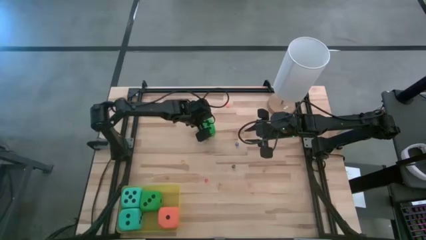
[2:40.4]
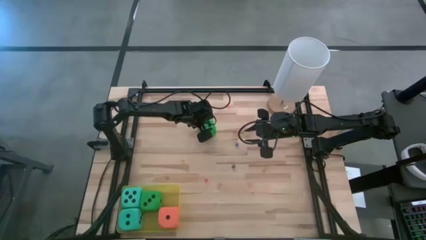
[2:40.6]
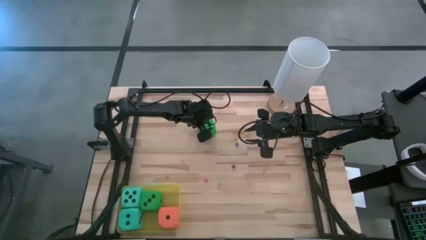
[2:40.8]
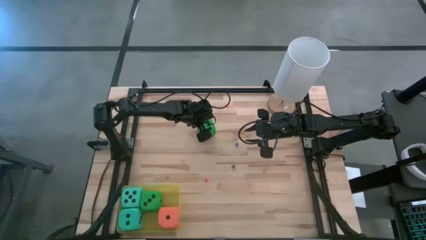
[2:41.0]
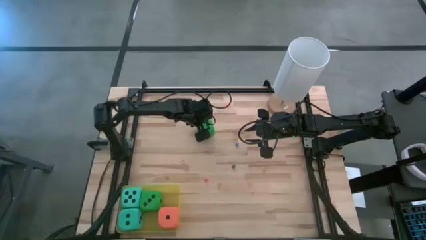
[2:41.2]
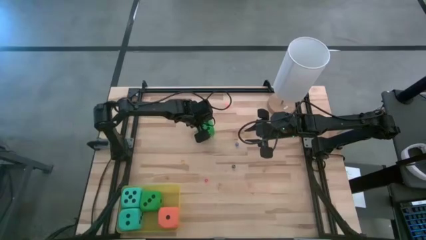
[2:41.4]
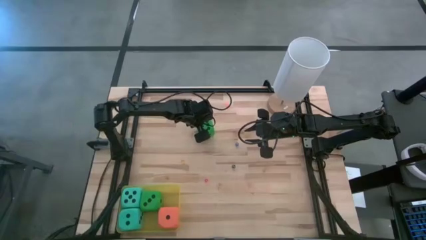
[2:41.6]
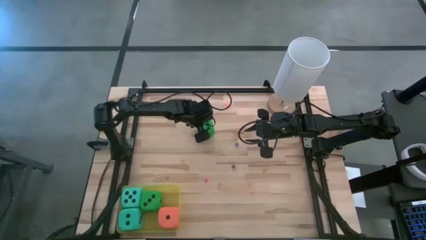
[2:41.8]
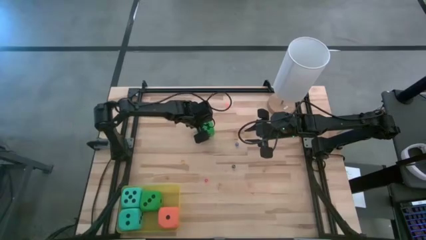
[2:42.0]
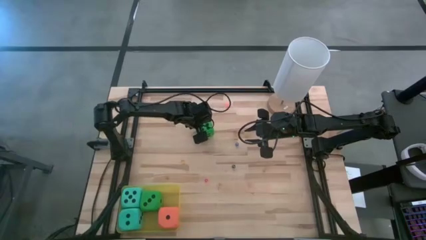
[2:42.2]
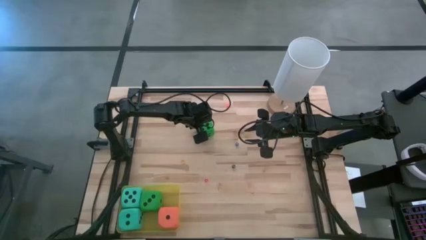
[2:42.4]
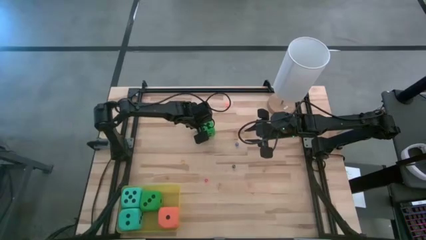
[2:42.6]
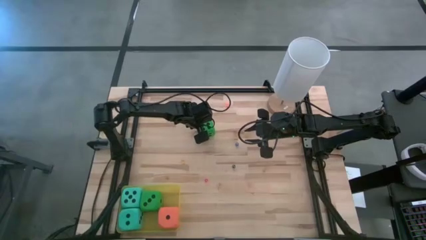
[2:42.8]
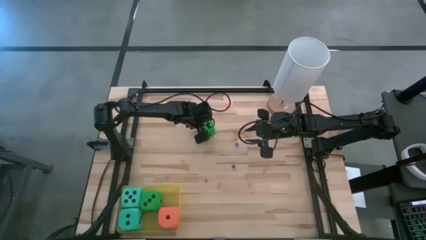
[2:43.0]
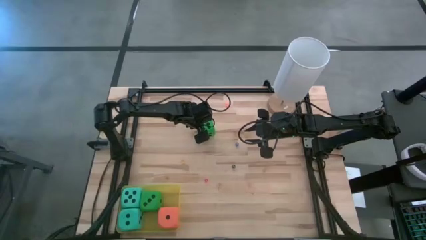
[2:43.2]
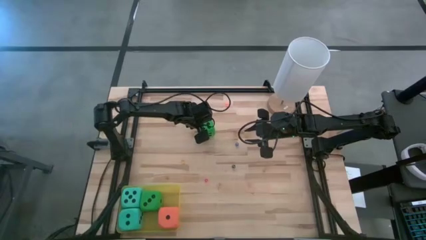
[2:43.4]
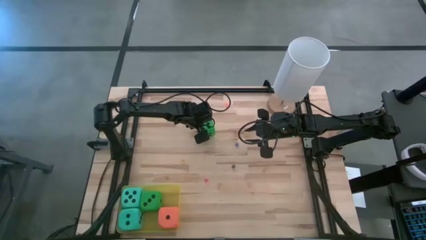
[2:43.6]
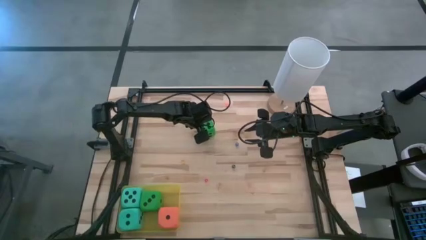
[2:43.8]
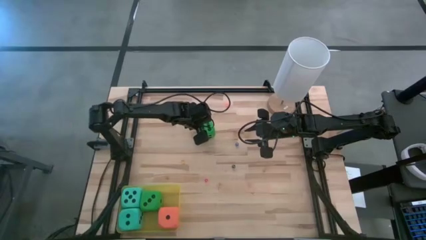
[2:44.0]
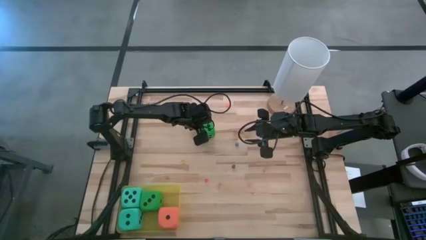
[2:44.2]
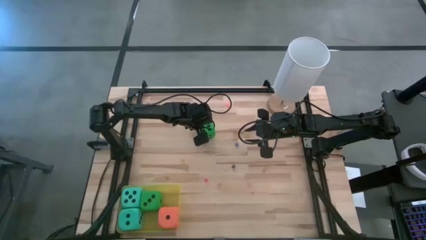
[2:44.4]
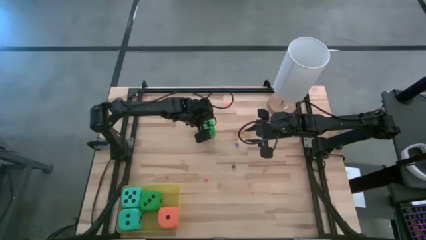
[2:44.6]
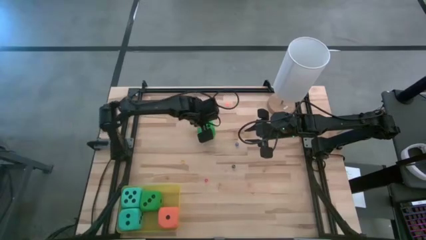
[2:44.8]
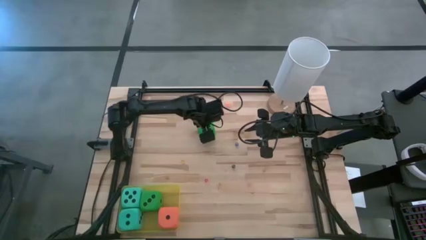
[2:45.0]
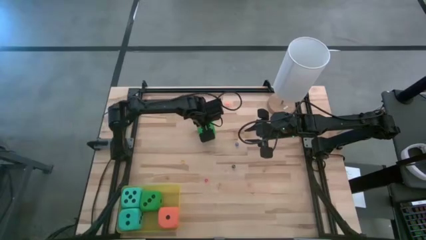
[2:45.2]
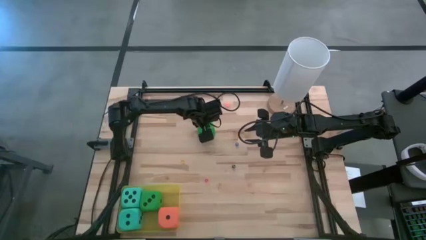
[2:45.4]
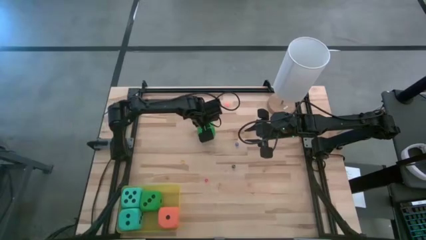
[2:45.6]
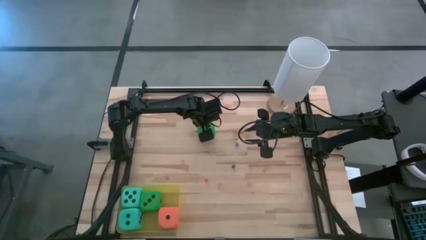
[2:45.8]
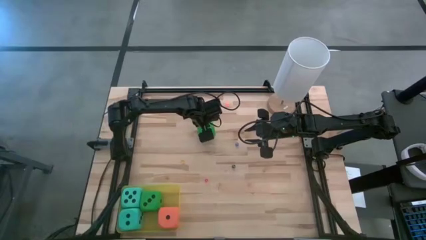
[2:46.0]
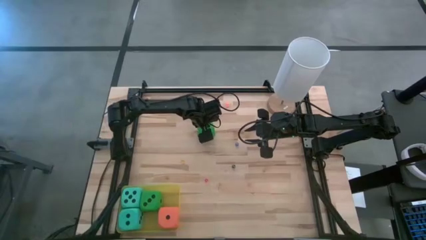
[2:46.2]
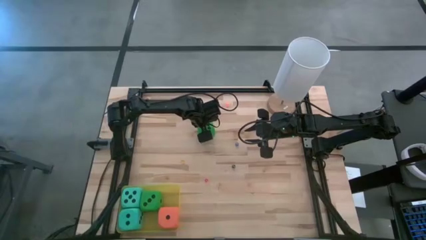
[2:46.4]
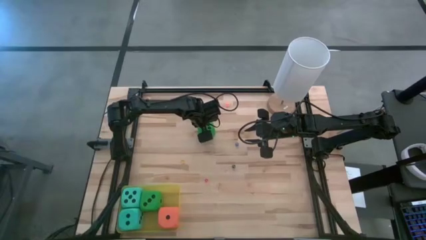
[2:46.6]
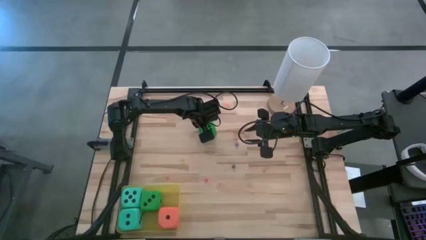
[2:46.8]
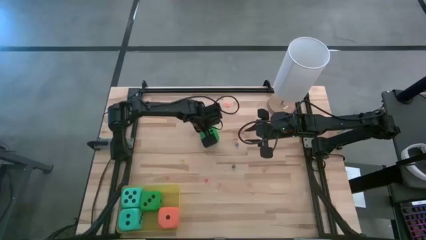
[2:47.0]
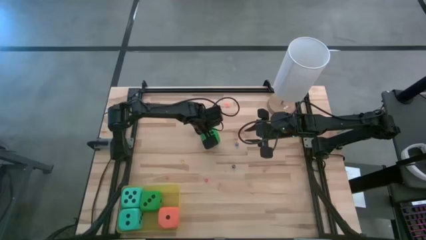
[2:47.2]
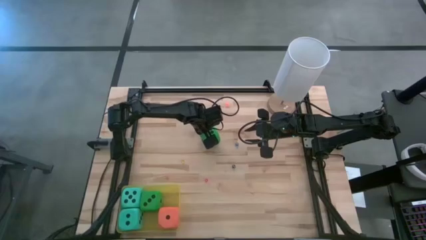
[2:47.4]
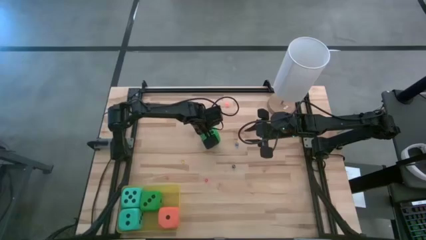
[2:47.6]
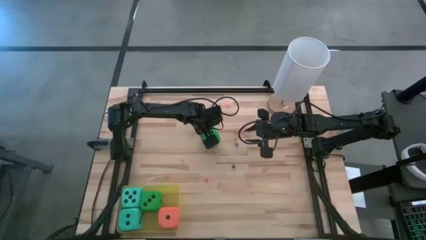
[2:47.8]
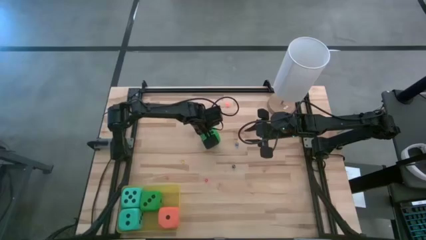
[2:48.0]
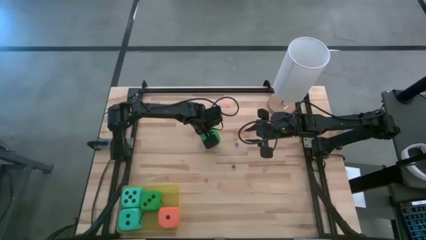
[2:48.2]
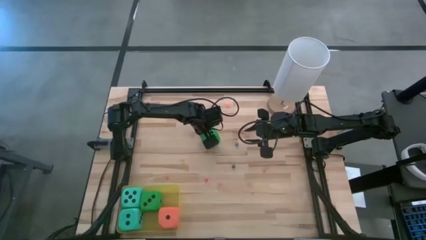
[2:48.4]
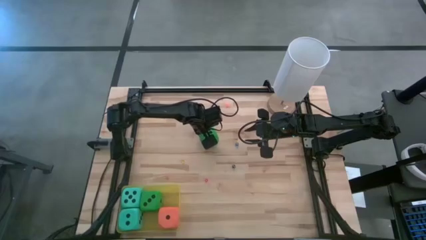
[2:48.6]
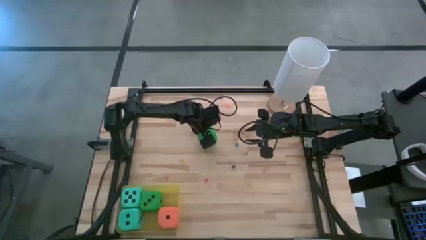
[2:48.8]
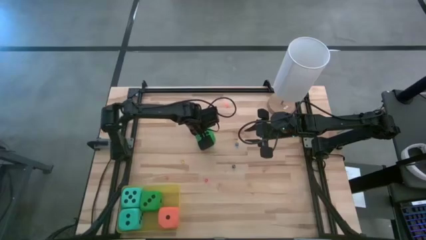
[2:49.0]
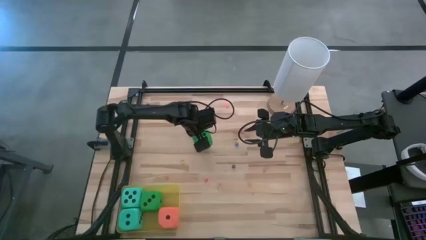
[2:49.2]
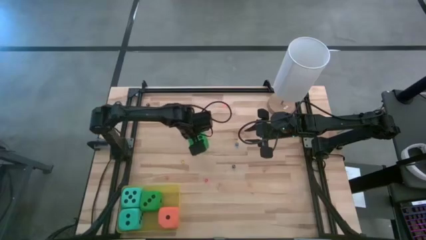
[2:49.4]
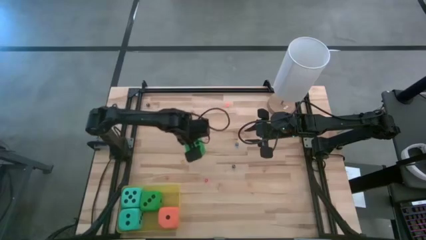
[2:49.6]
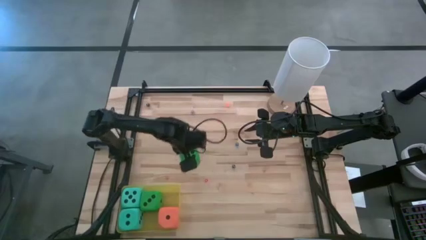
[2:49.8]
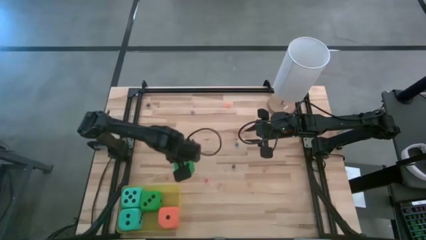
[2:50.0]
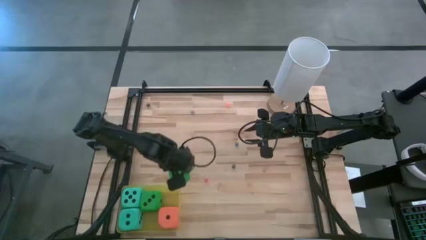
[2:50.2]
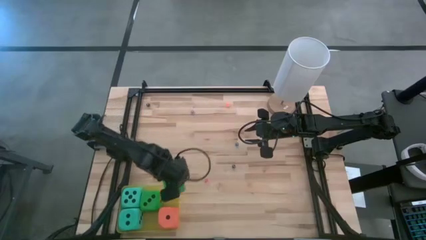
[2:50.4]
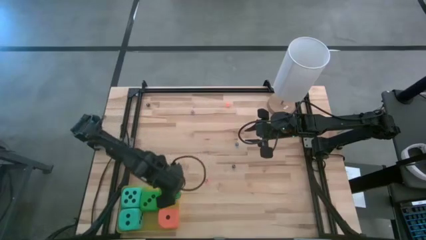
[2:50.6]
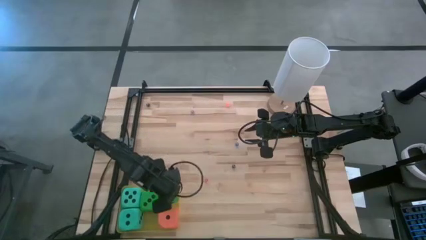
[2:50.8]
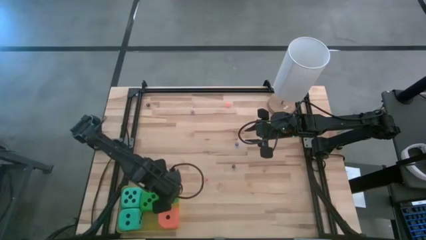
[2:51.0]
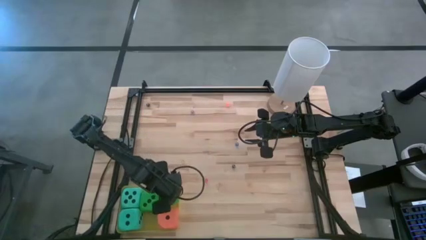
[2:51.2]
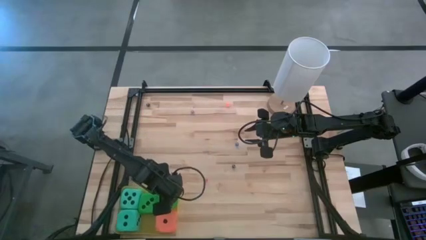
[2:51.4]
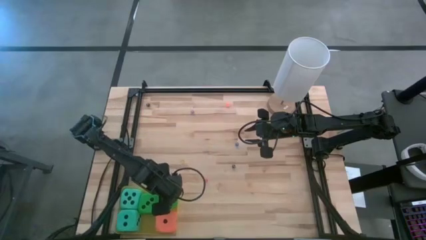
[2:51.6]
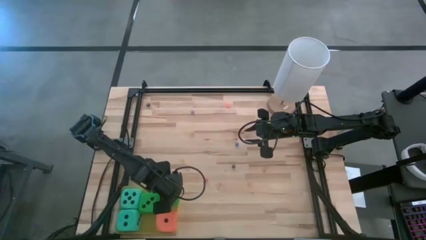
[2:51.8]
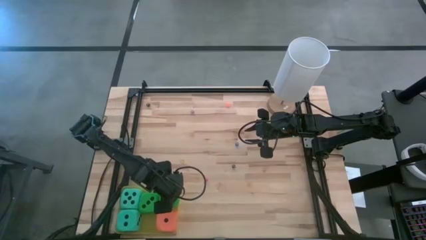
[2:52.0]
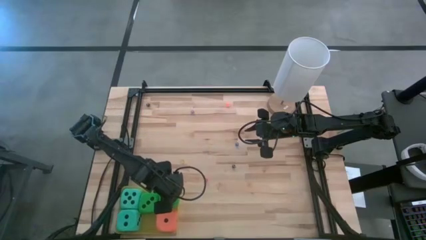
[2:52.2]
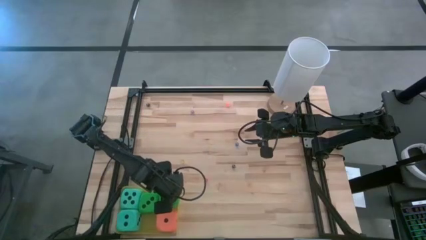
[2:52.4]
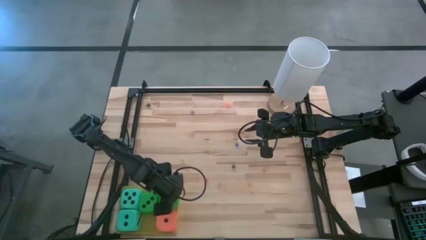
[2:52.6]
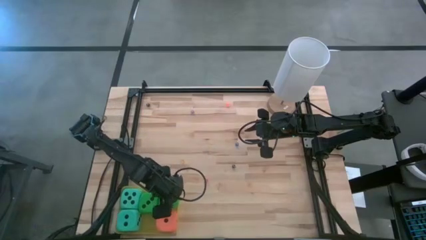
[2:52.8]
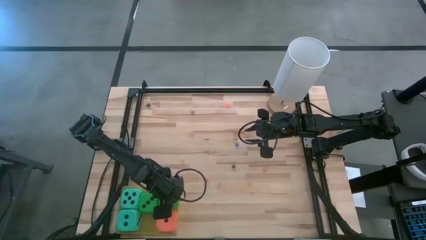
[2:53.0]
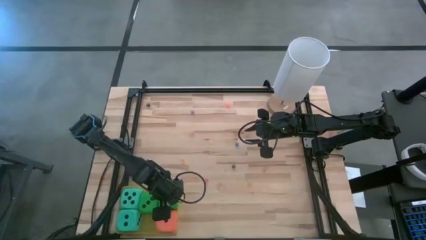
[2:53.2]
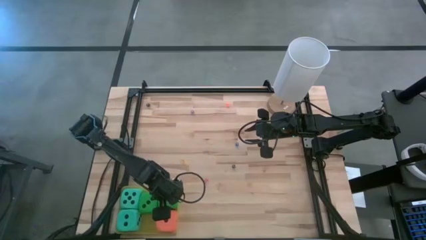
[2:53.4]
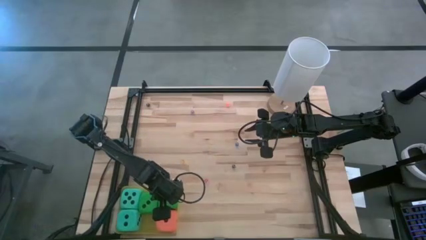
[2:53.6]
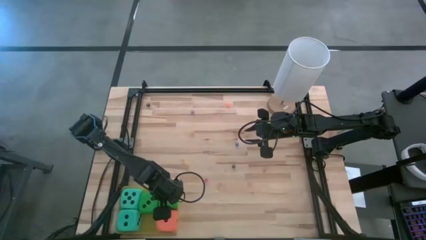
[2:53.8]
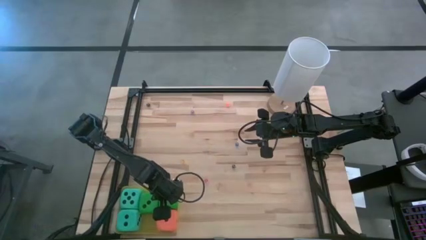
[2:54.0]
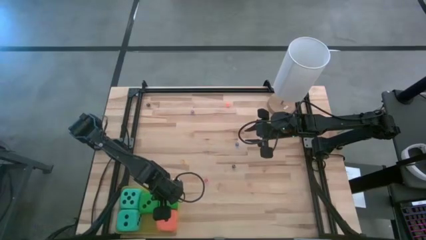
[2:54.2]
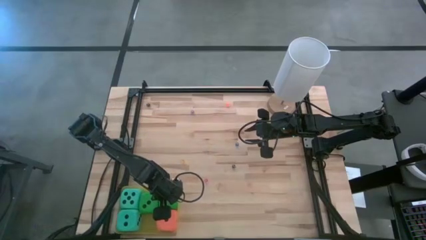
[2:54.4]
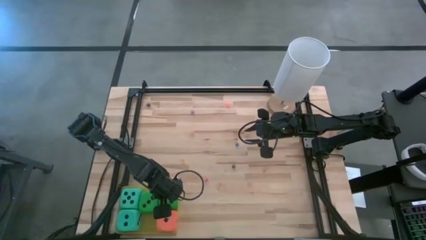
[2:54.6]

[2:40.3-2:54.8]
Task: Pick & Place Dice
Put the large green dice into the yellow bin
